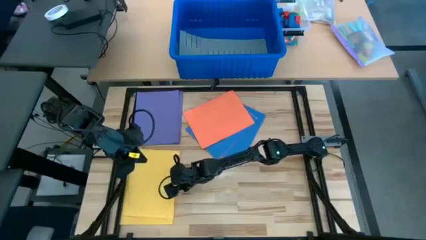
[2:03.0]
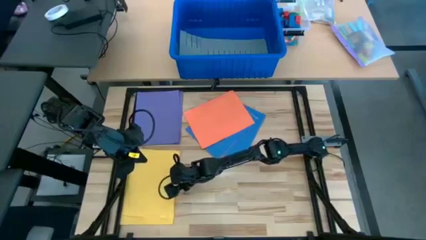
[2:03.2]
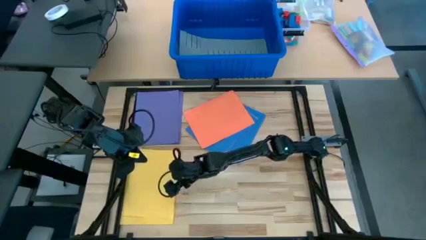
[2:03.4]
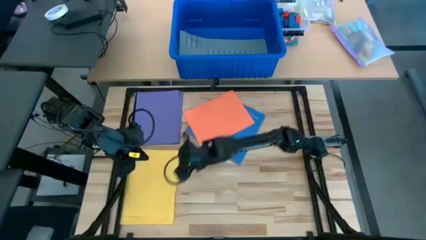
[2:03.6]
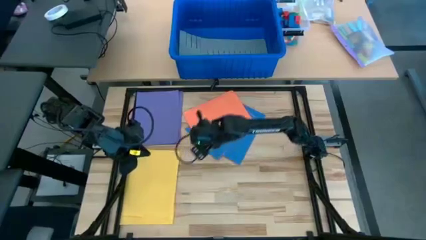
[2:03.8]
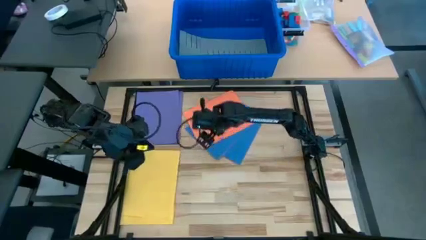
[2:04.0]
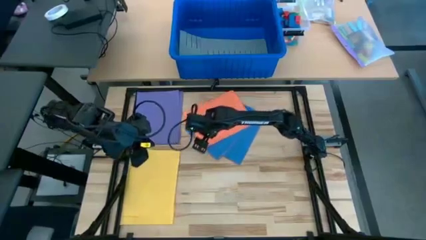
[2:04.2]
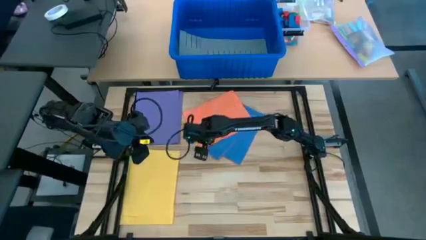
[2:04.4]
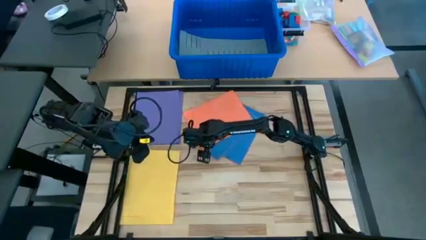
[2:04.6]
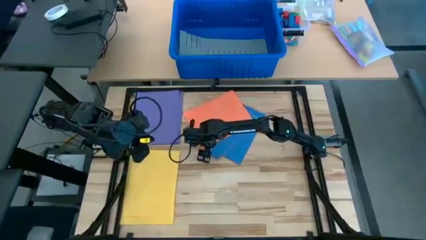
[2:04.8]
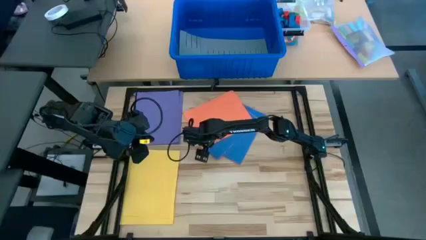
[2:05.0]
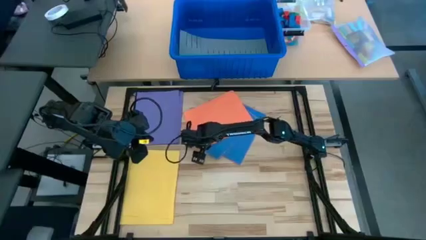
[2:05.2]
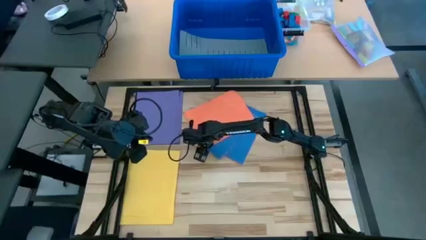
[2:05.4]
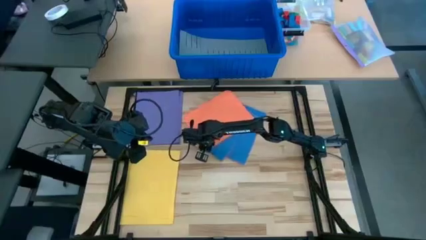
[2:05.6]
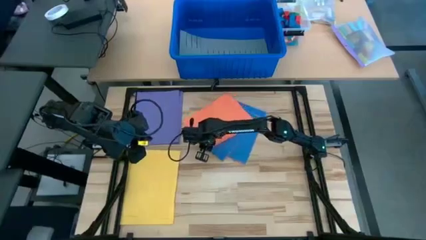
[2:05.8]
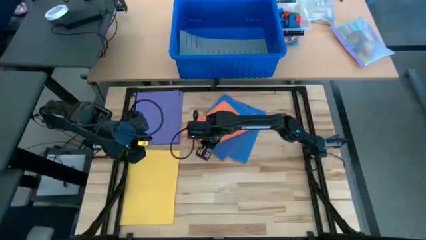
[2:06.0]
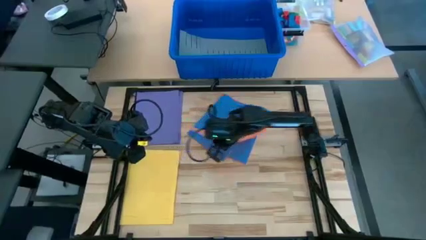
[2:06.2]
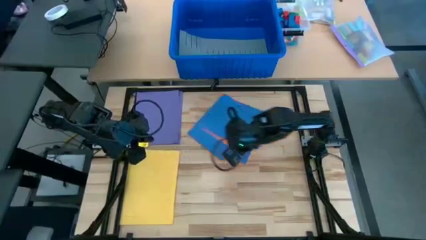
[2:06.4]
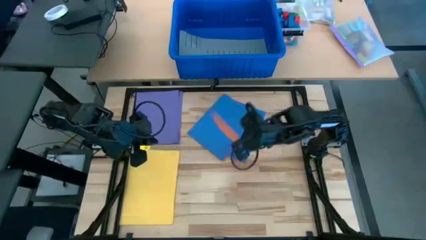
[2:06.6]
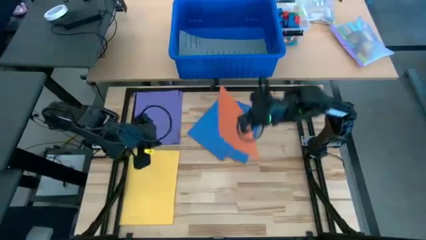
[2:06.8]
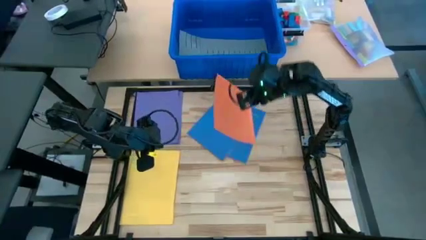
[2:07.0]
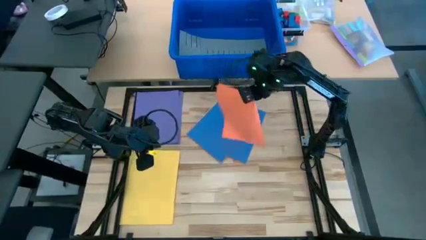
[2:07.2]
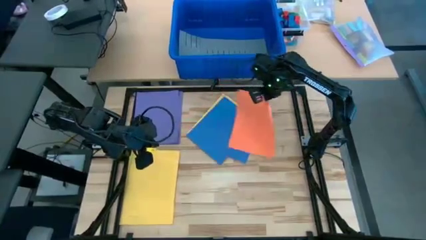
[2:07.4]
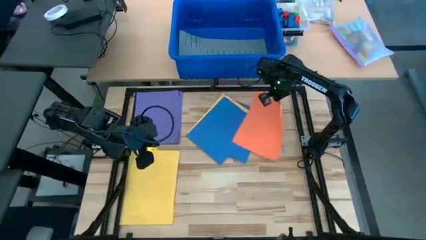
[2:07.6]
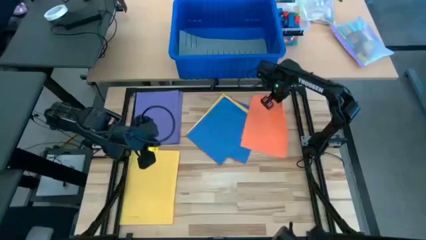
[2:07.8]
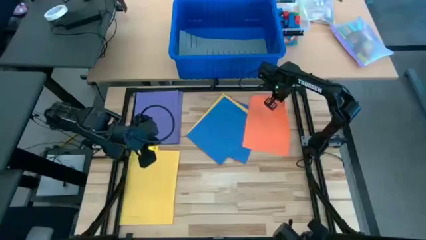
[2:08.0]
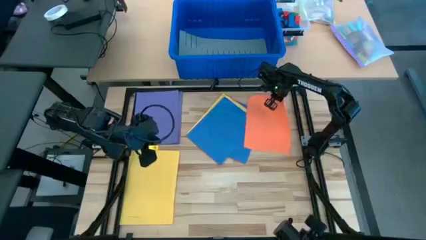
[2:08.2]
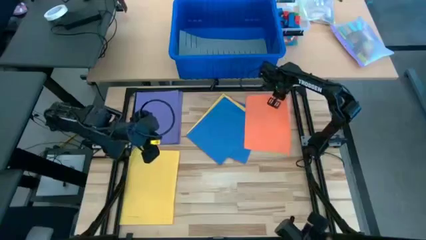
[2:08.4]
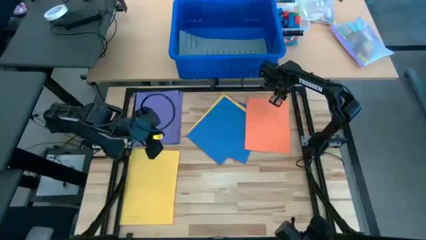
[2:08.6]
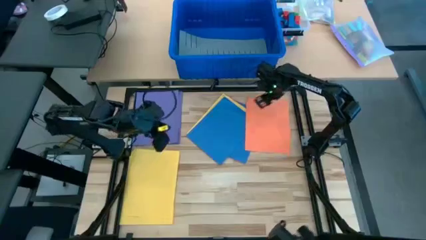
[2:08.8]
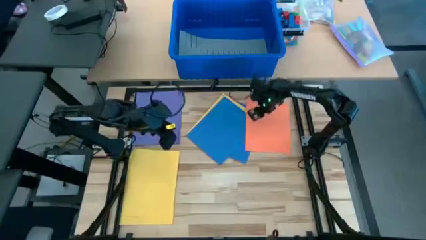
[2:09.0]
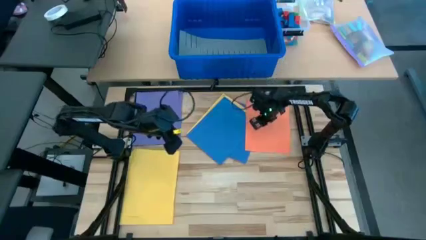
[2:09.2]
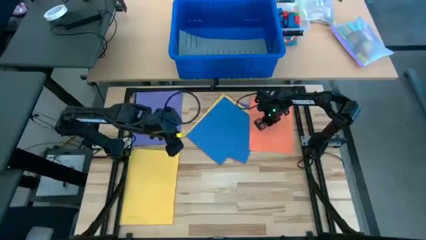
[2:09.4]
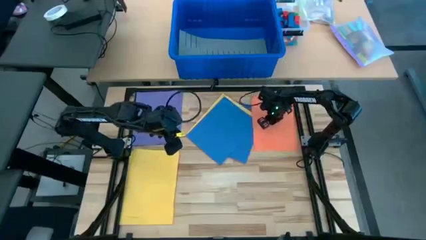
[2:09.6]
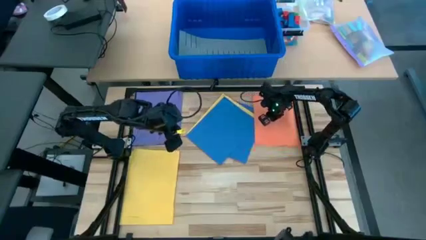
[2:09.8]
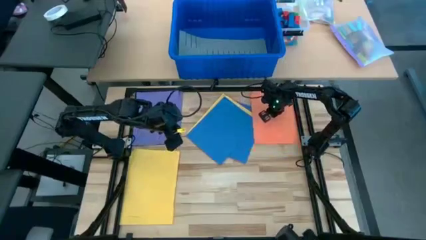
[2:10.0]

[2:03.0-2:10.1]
Task: Organize paper
Prepare the orange colored paper

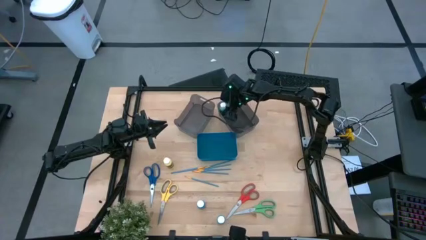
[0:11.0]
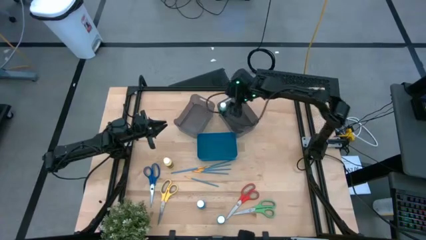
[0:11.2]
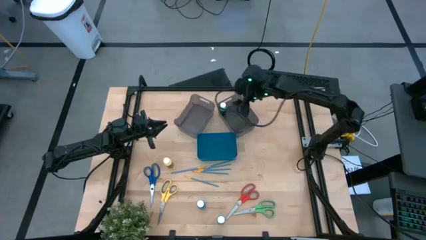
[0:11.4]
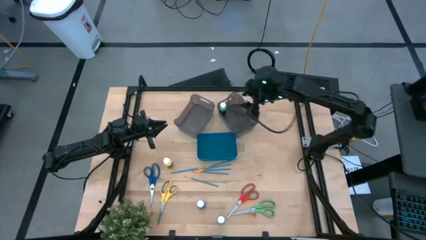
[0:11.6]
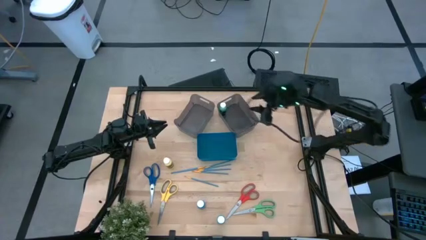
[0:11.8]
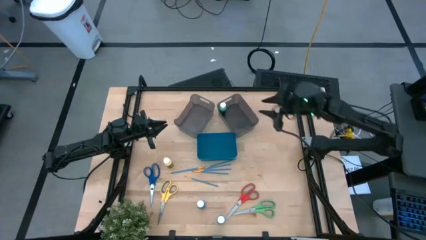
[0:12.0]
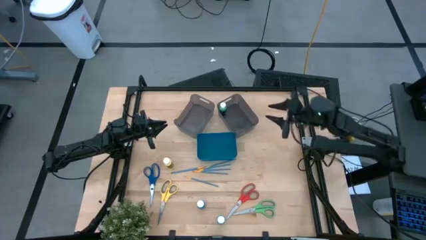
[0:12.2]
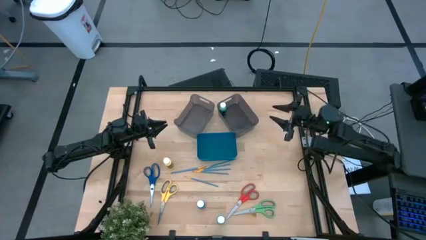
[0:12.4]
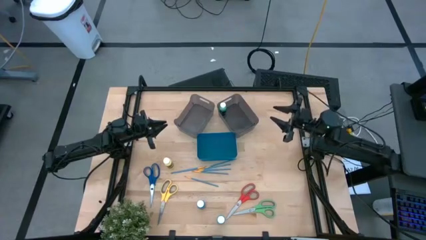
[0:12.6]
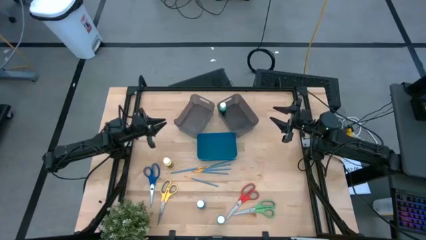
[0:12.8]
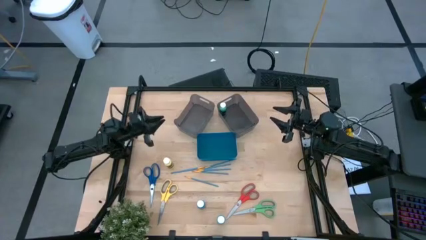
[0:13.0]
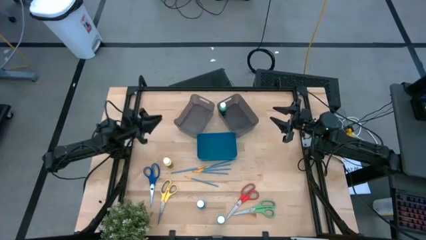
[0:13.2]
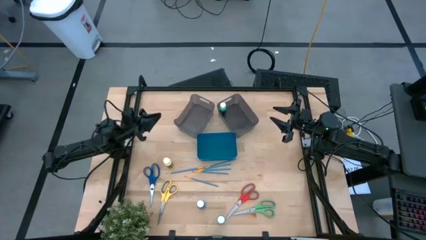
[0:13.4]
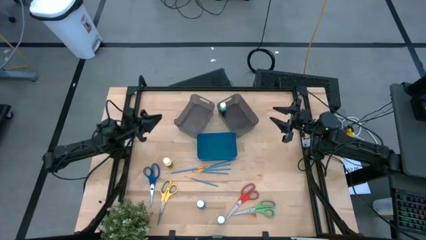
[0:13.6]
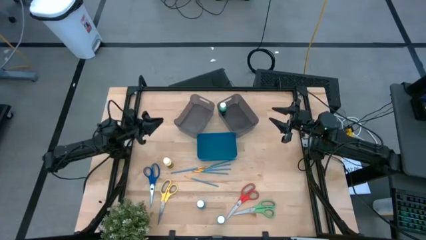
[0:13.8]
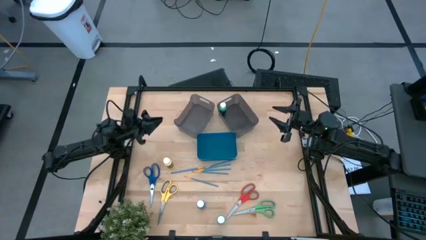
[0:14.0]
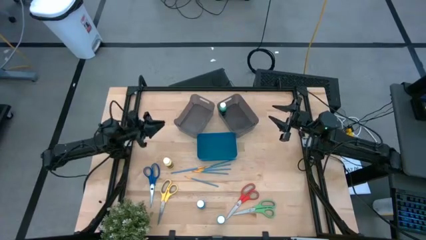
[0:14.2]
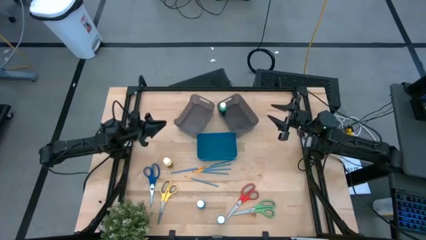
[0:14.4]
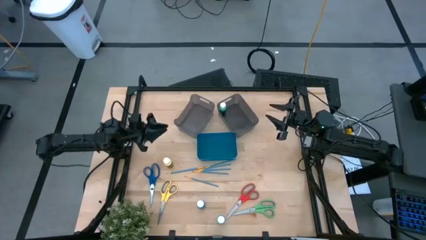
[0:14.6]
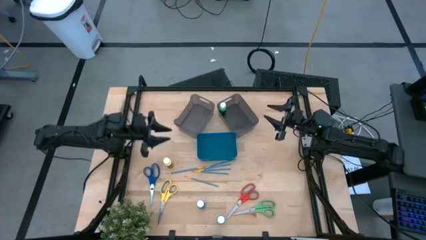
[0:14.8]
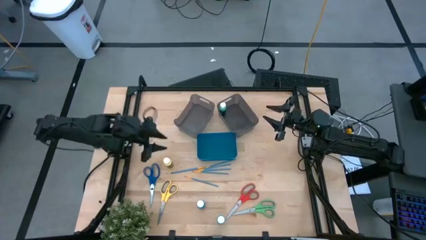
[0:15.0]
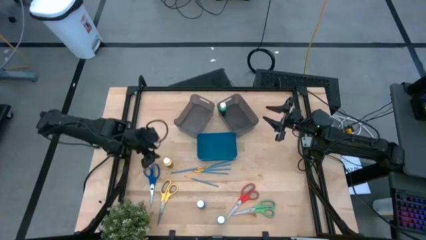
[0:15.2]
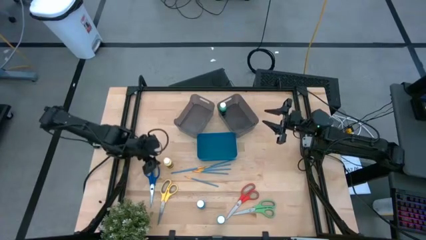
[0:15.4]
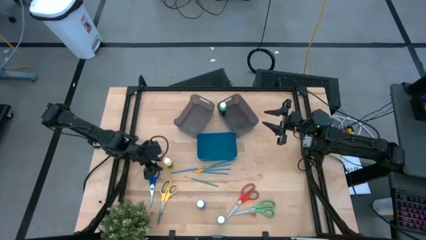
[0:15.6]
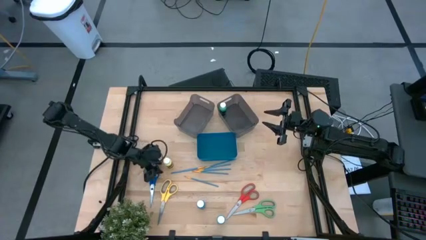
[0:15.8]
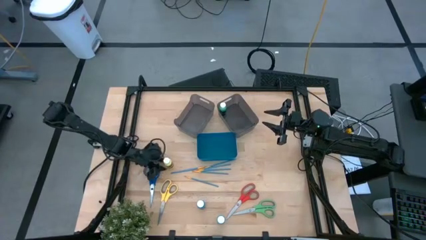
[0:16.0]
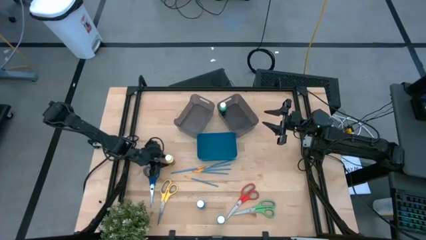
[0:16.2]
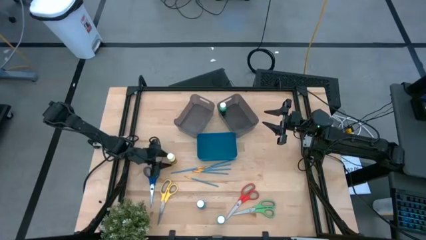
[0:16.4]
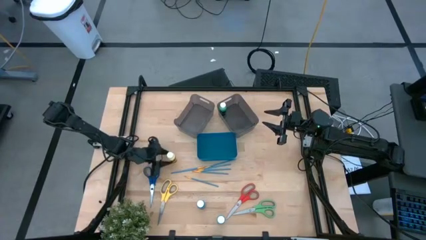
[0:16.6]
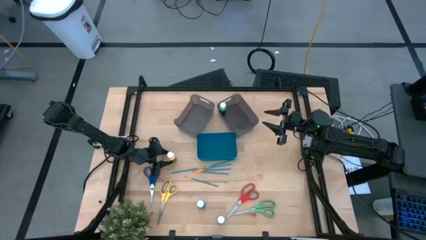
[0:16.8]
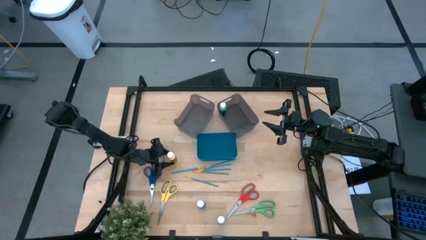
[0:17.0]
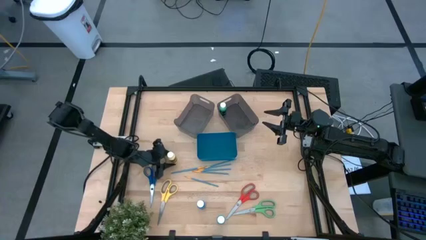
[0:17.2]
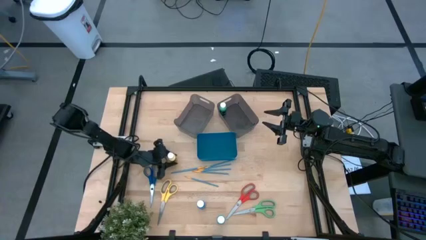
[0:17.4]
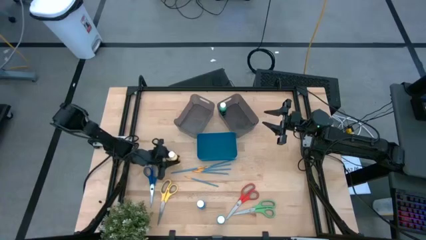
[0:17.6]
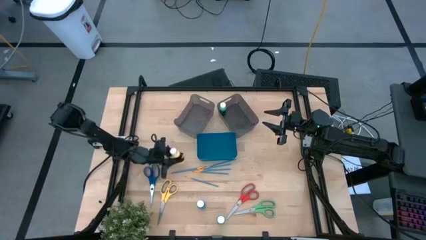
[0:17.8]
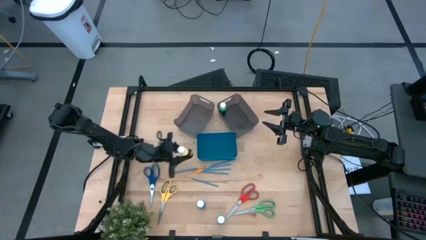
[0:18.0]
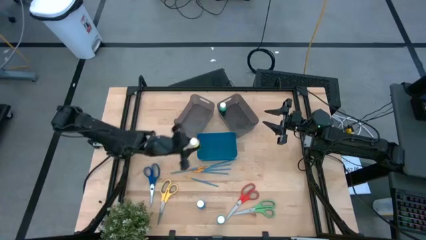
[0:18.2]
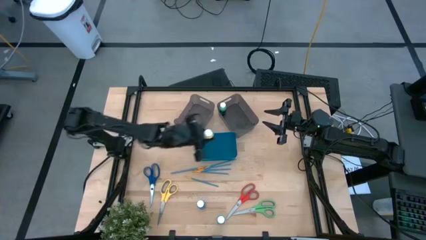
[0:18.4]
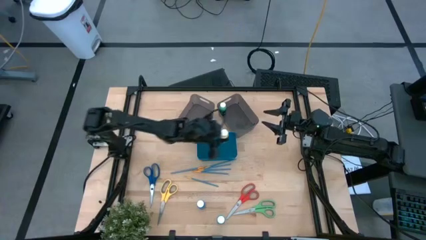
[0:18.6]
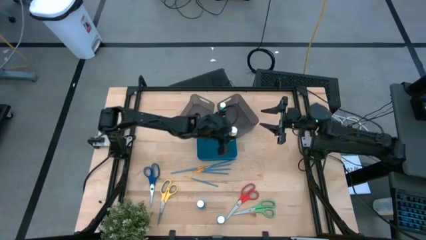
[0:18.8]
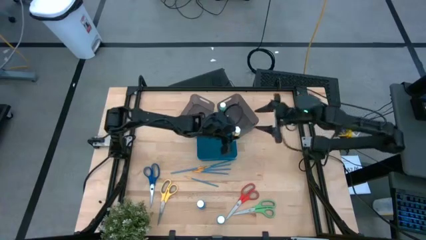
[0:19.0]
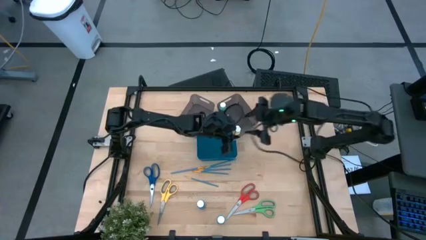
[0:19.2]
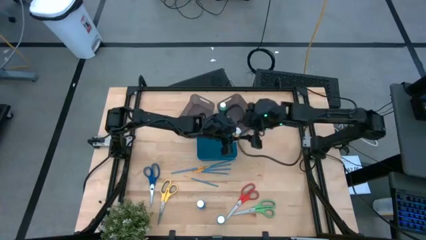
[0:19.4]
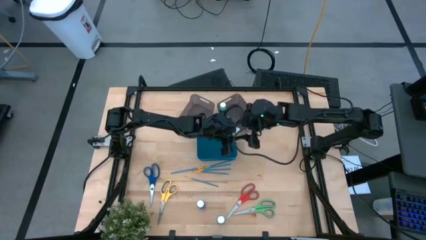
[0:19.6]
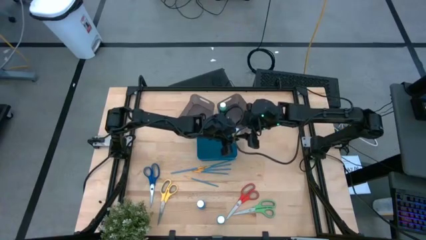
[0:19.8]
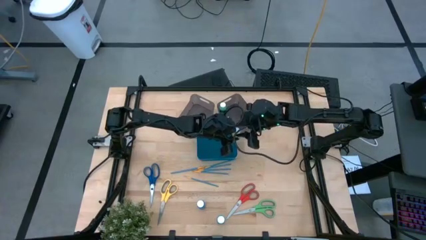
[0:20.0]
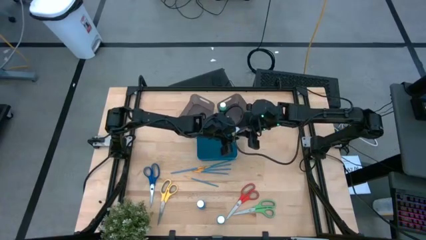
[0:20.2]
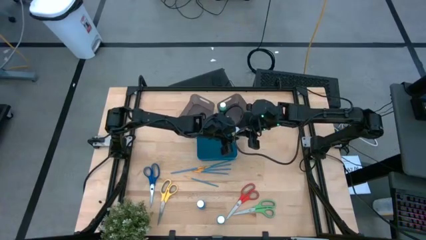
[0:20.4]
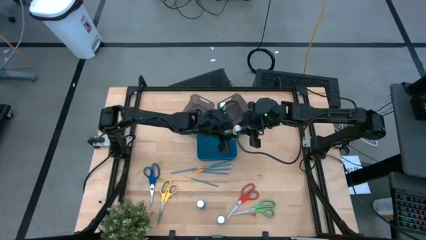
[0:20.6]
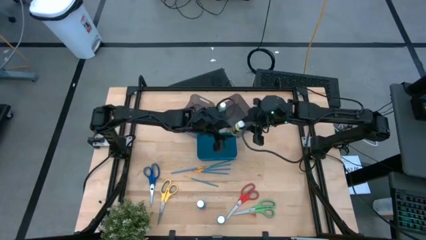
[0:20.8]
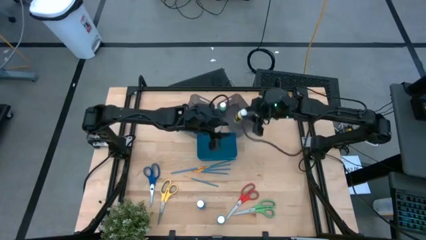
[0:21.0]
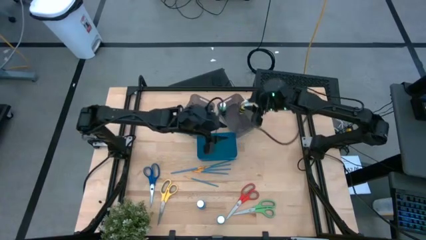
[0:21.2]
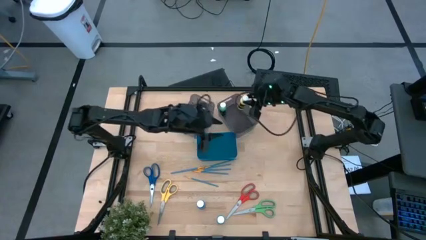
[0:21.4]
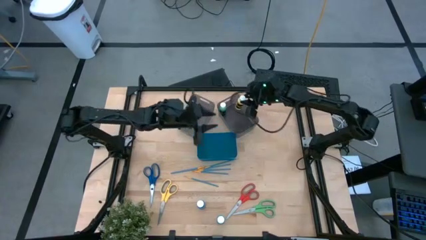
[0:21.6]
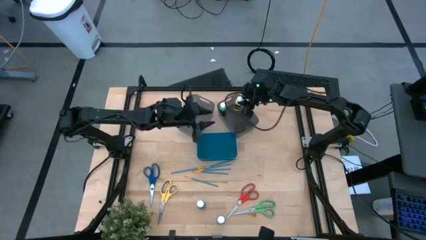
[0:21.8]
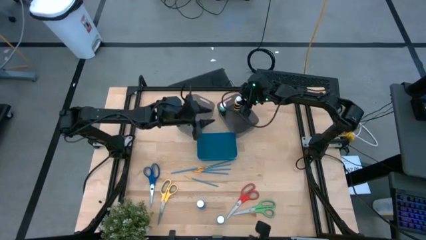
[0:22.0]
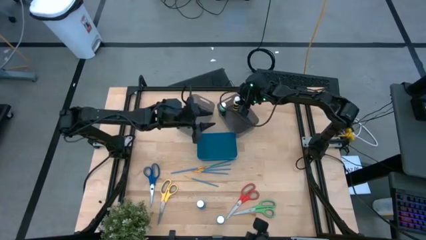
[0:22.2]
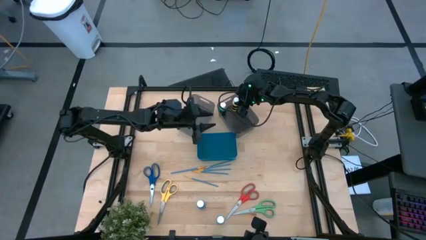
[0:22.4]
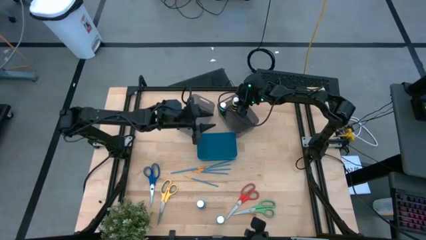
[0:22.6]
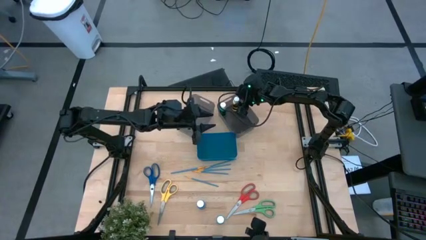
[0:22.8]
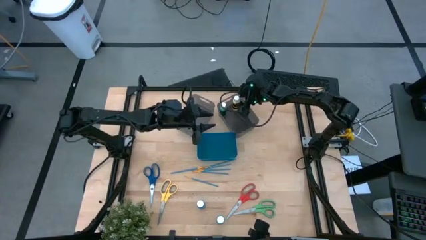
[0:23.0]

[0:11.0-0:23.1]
Task: Pick & Place Paint Supplies
Put the yellow paint bottle into the right black bin
